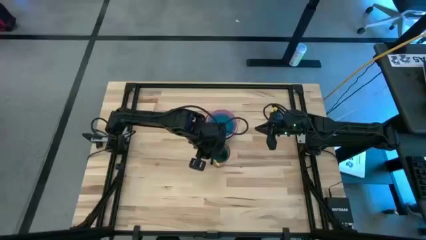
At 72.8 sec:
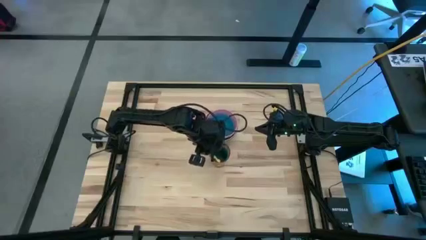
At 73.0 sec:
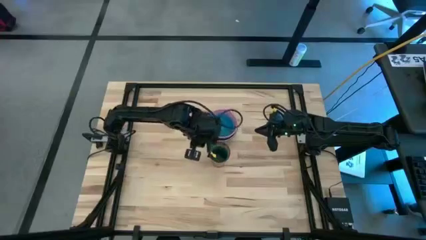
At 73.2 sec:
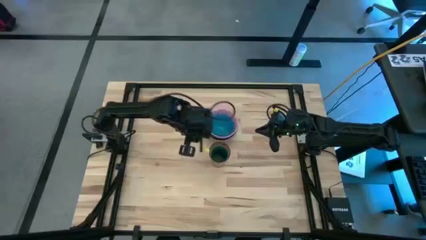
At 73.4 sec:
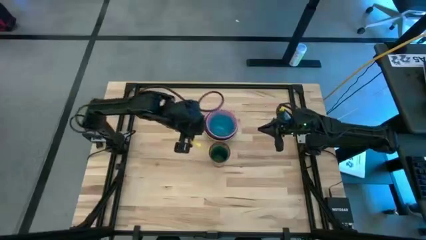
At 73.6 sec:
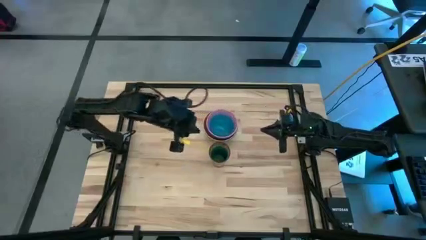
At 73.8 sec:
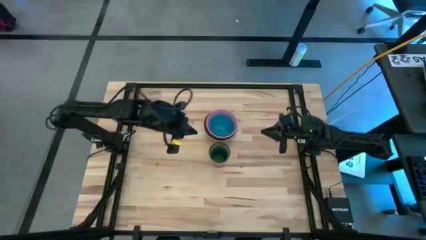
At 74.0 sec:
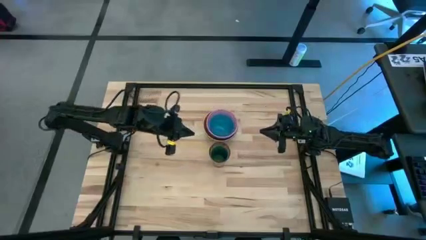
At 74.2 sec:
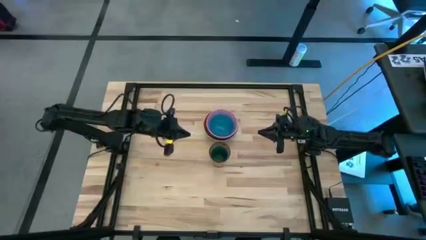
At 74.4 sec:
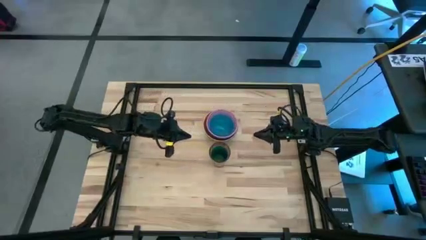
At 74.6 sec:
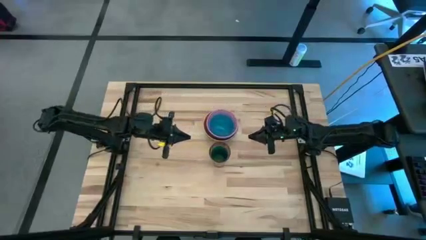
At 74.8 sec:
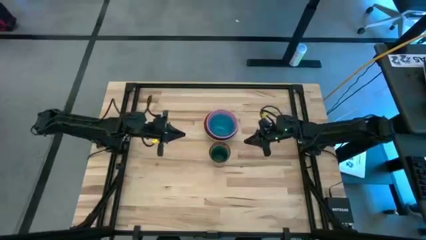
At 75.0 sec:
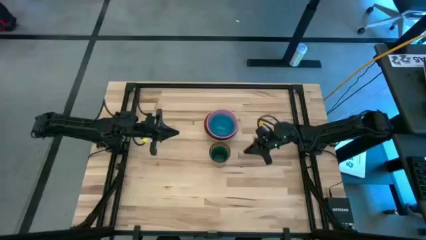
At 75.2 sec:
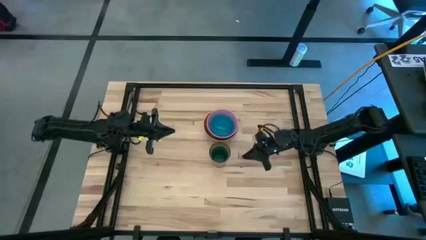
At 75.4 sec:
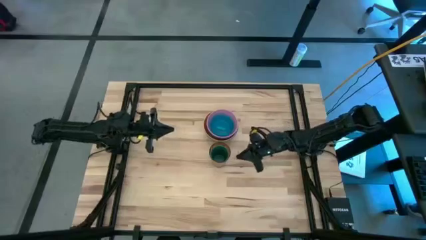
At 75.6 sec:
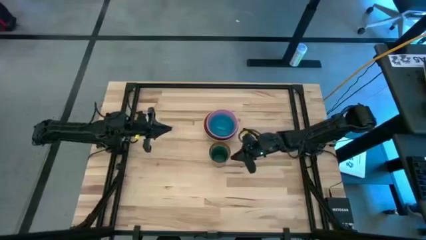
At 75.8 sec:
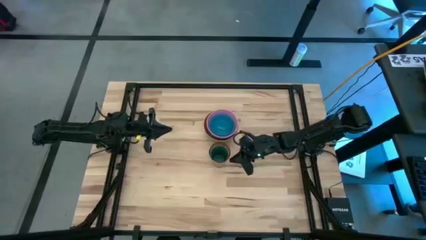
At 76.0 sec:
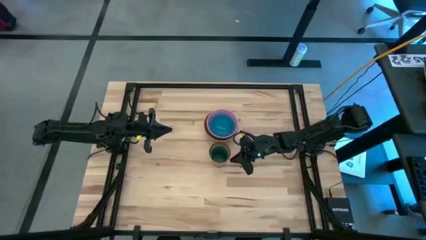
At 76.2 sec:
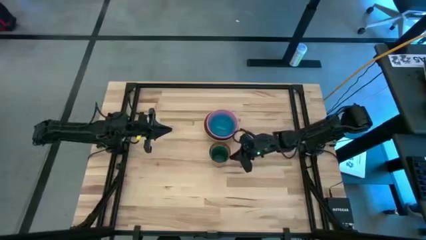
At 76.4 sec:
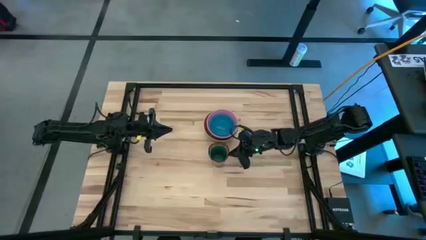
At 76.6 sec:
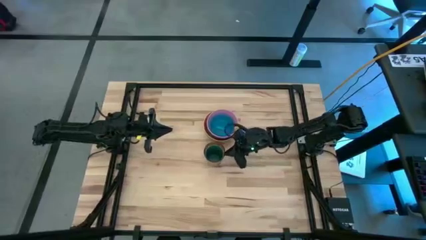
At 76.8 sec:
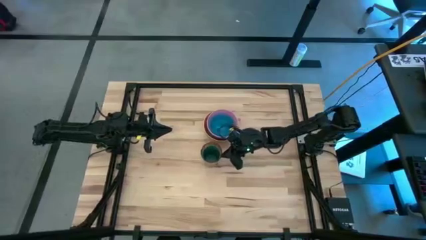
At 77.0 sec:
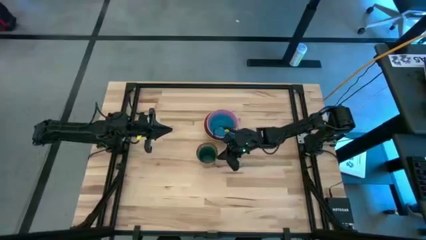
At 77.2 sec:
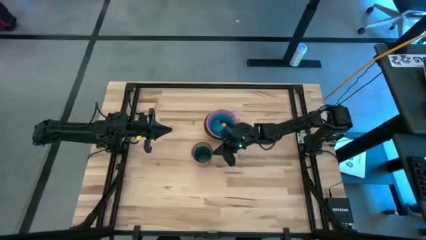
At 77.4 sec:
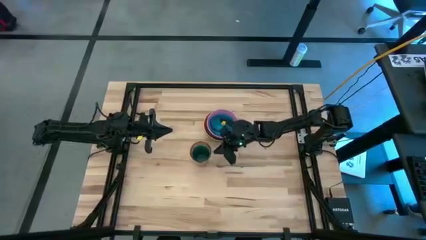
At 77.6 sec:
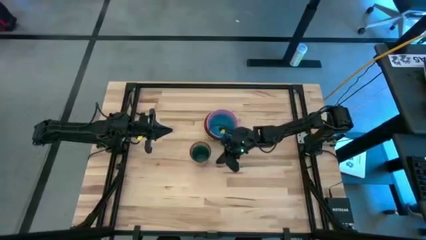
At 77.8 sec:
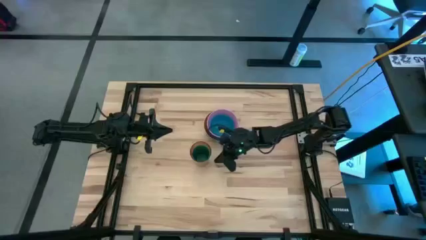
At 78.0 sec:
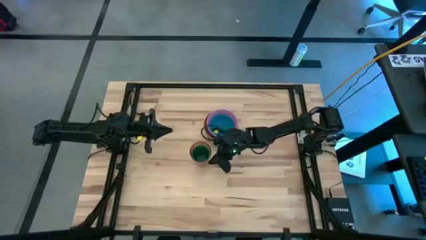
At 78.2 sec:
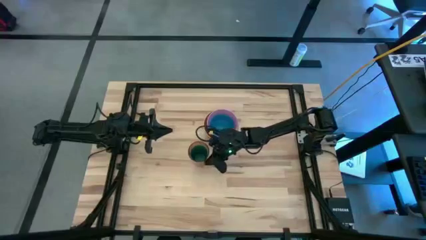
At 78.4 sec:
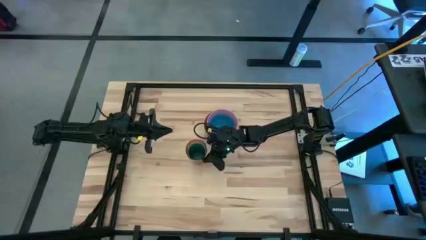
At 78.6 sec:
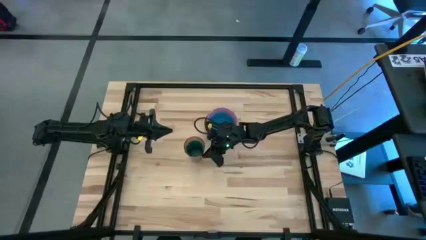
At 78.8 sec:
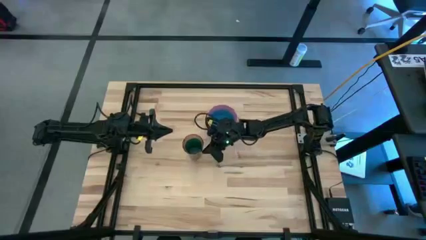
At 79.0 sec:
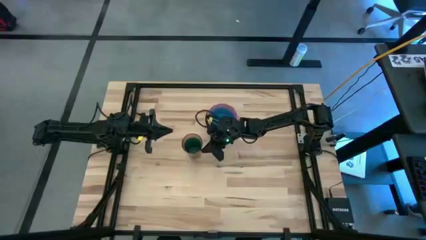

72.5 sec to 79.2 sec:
Move the cups

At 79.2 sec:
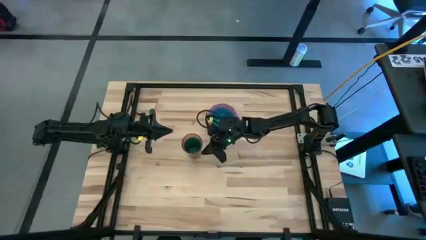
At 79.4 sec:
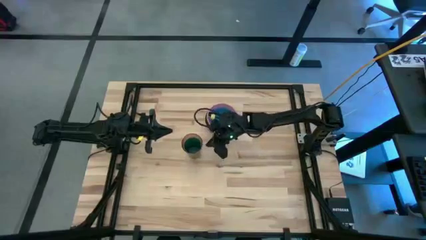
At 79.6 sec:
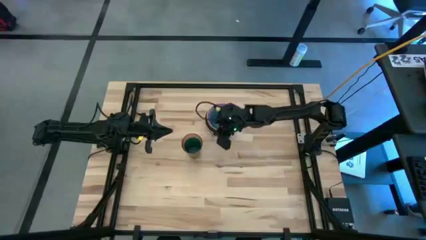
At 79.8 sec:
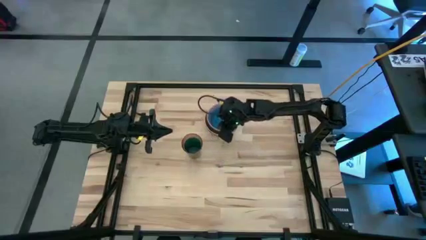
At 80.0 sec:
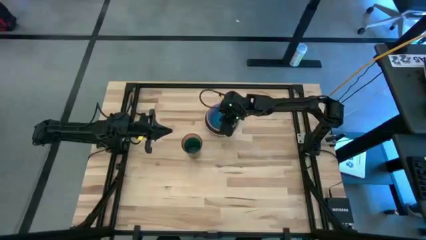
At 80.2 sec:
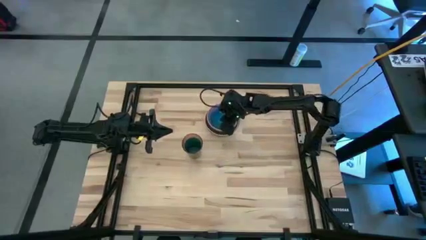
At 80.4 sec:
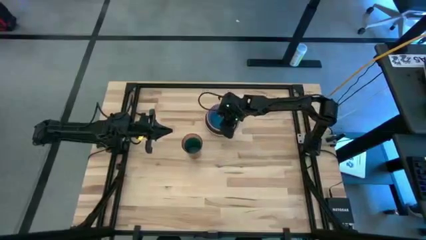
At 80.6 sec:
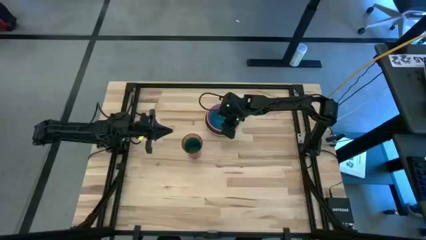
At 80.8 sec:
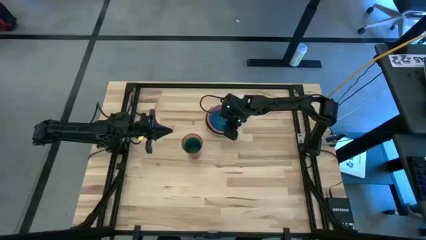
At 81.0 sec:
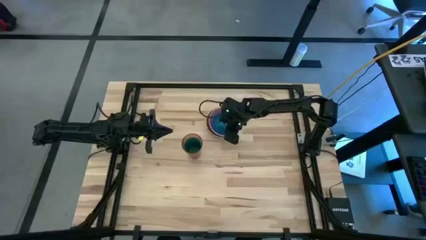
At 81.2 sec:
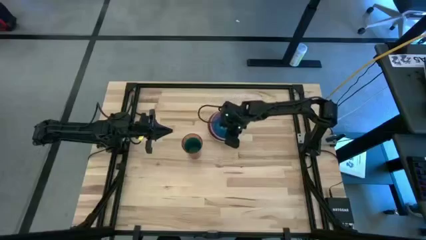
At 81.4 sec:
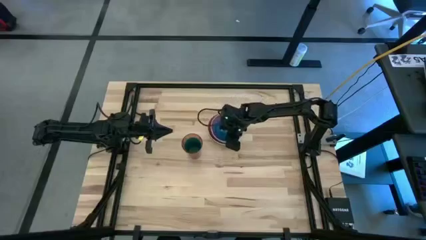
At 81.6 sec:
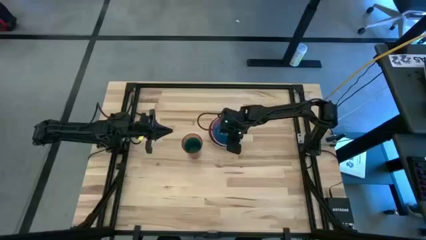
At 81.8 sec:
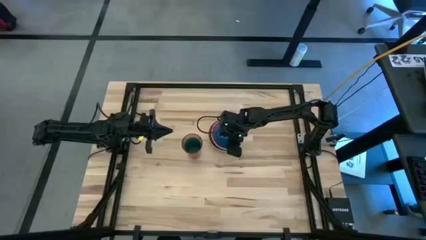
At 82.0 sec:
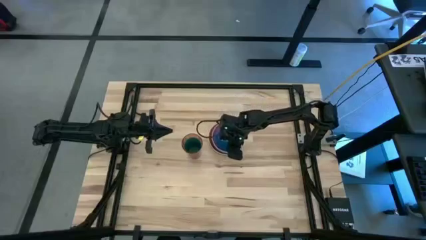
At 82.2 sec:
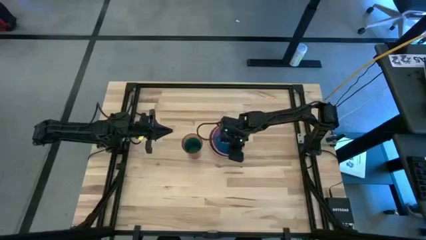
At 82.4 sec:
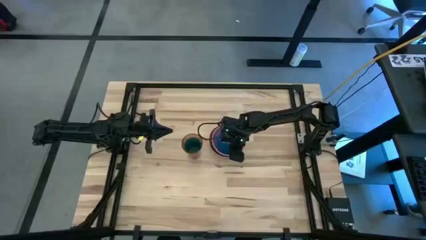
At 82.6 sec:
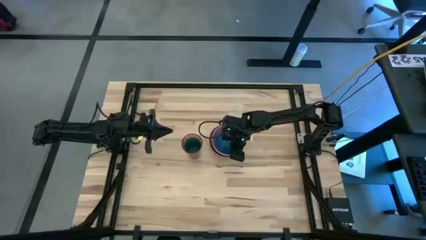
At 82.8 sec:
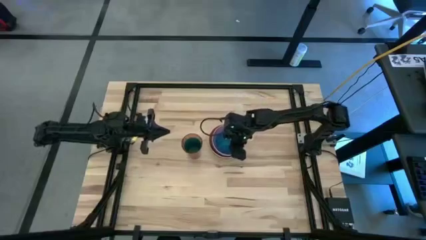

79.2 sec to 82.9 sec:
Adjust the stacked bowls on the table

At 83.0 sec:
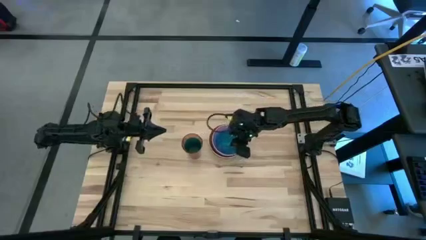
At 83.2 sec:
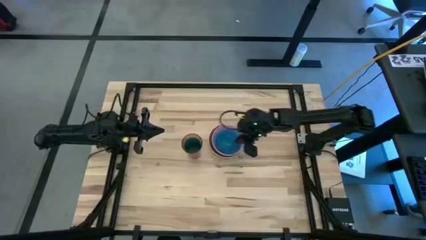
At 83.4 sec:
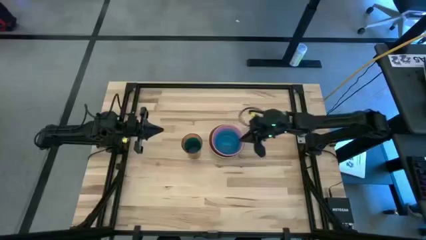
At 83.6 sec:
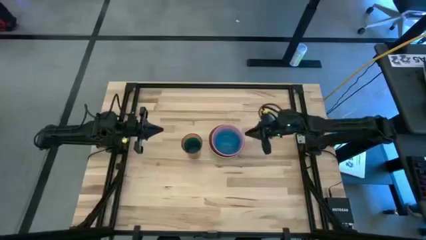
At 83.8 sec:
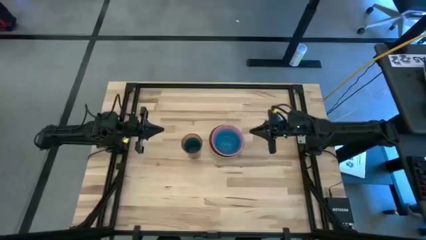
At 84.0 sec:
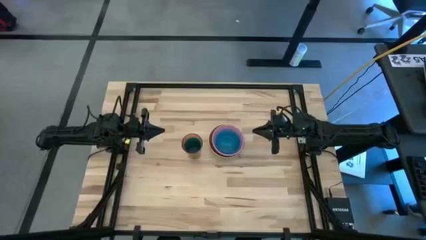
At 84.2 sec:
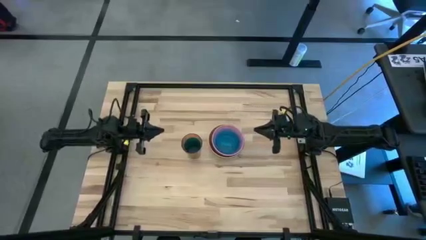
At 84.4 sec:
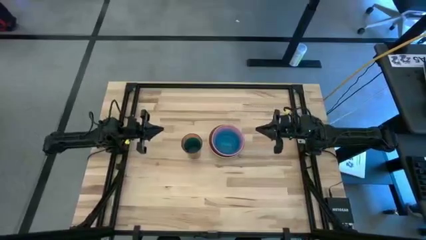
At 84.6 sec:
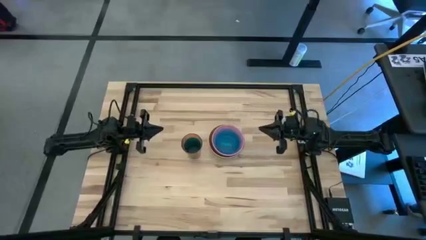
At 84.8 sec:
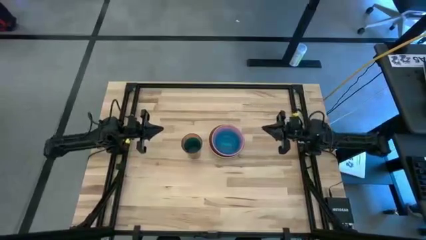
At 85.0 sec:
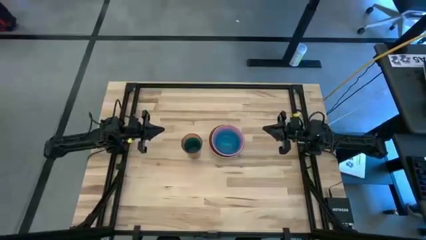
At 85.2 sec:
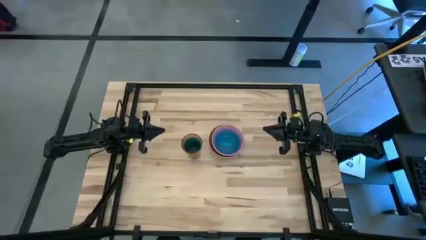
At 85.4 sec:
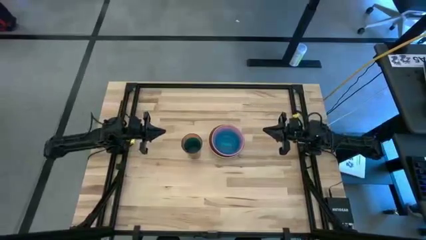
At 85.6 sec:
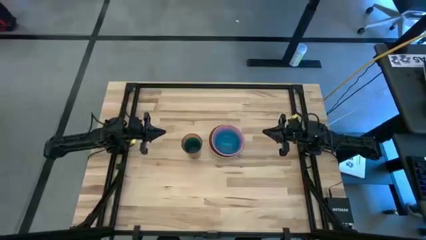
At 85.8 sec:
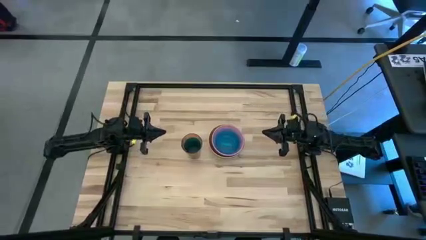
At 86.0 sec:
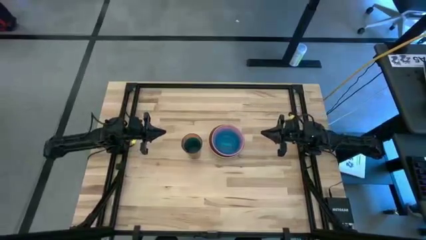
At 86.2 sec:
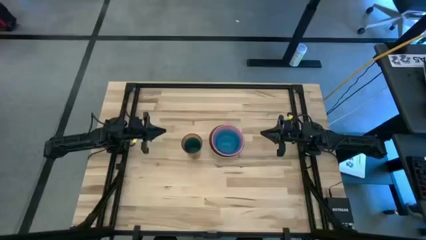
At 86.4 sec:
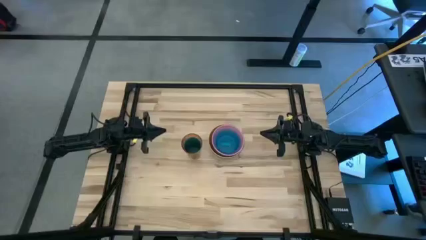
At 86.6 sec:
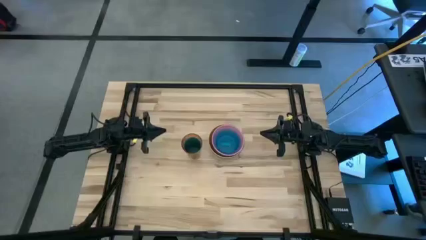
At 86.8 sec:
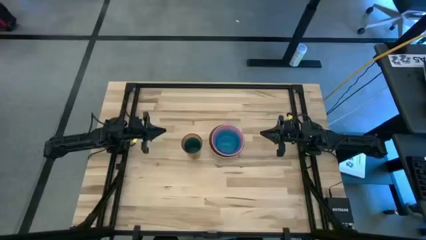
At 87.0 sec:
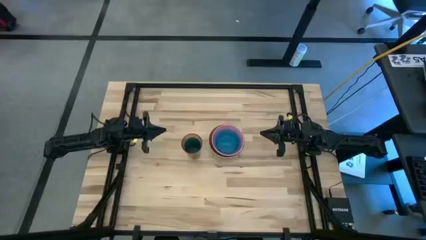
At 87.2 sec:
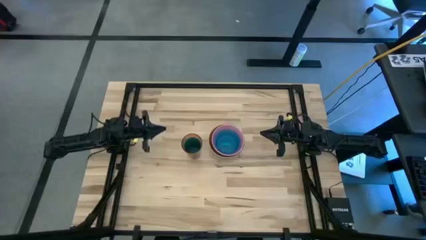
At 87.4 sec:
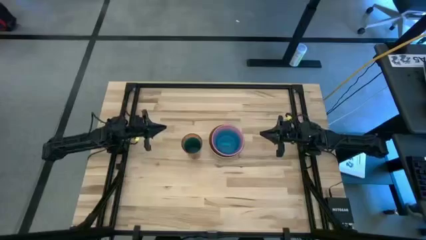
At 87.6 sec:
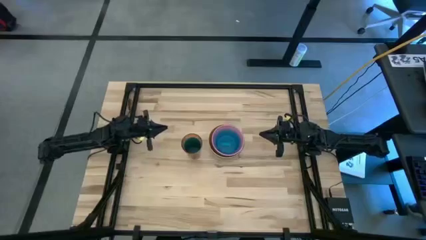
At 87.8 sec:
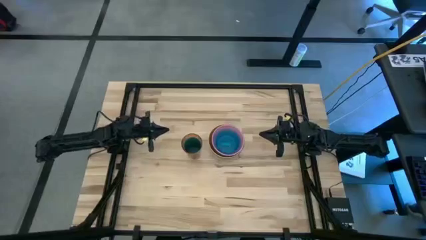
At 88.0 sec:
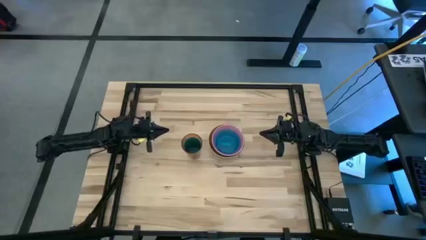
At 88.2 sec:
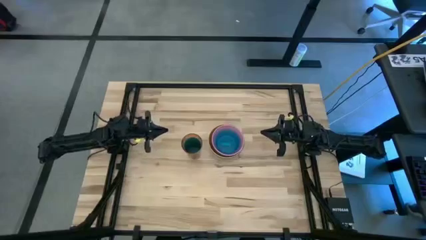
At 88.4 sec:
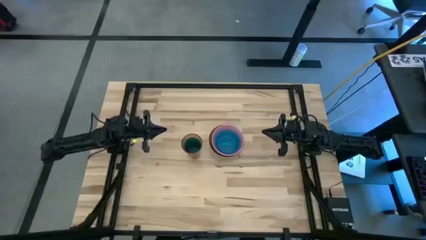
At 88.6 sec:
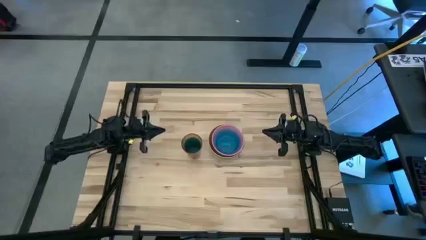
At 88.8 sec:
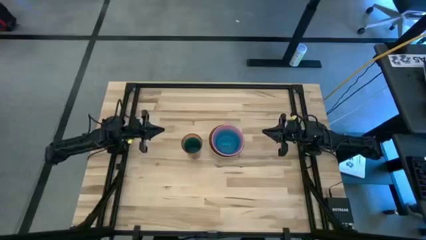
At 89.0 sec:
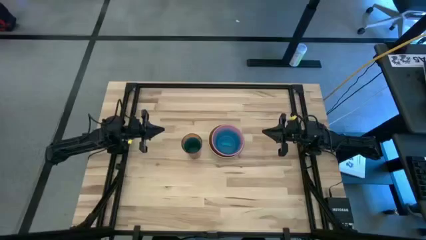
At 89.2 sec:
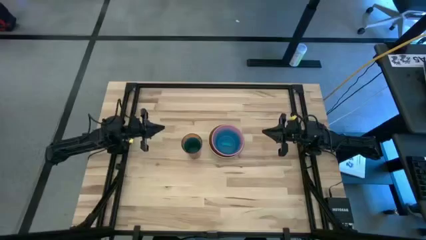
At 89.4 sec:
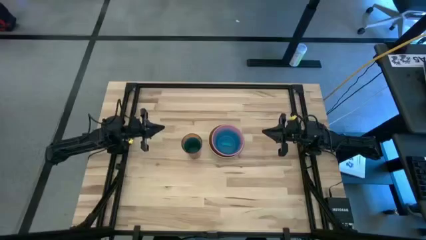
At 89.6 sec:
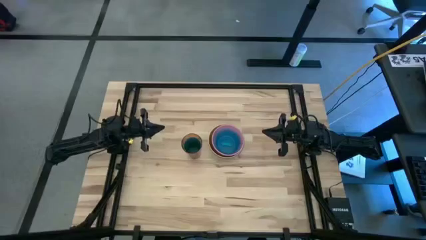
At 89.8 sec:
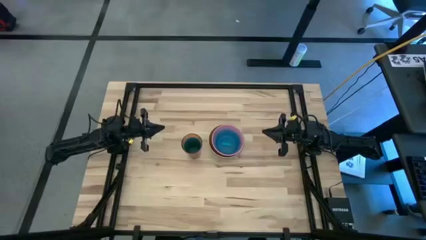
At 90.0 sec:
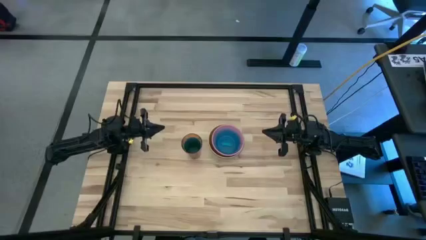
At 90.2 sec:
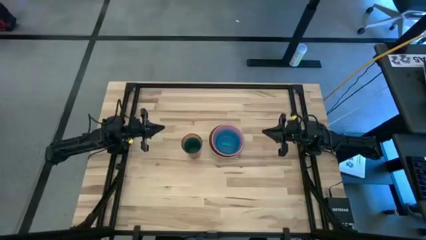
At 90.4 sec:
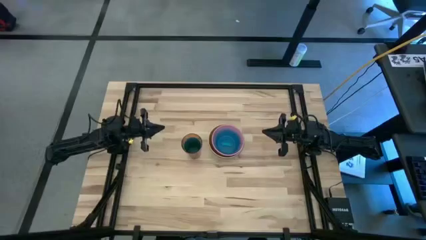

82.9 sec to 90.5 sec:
Return to Home Position
